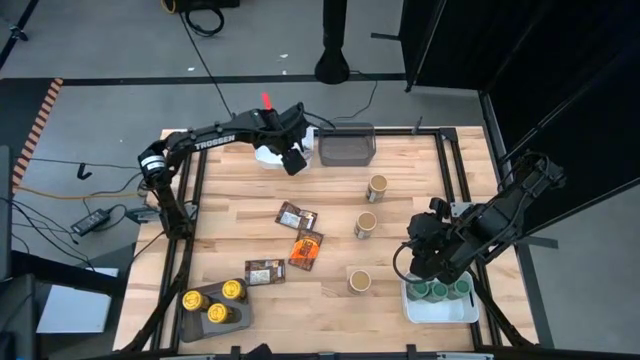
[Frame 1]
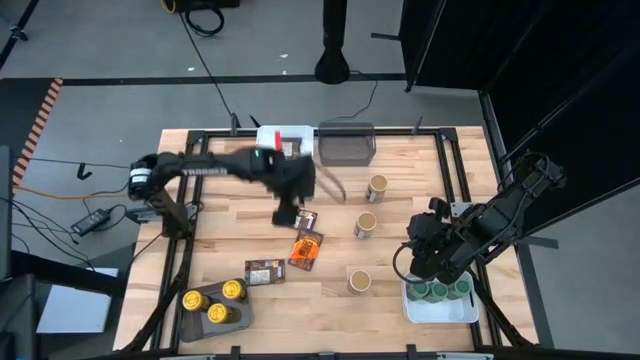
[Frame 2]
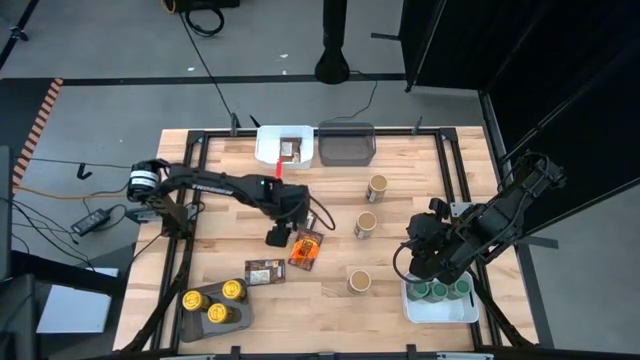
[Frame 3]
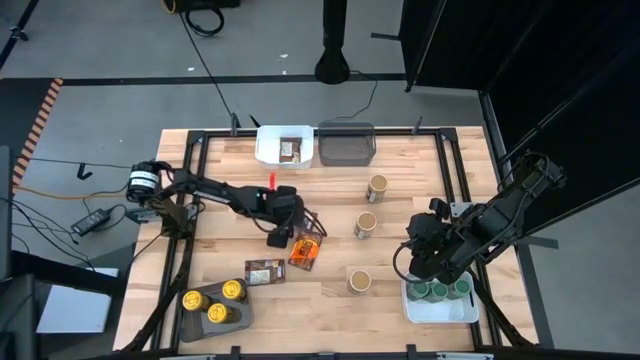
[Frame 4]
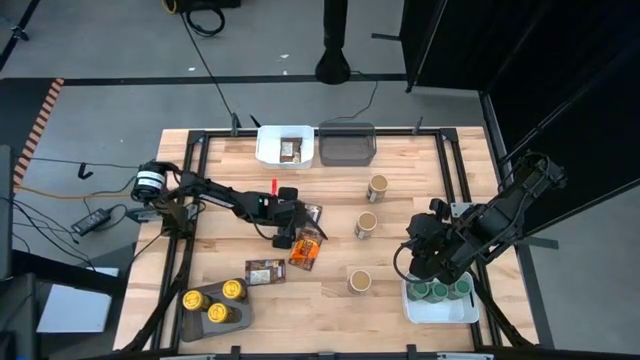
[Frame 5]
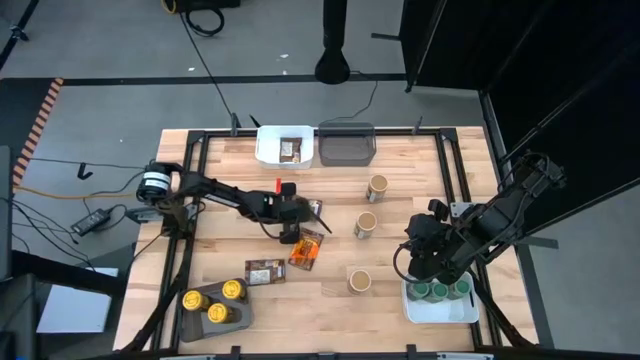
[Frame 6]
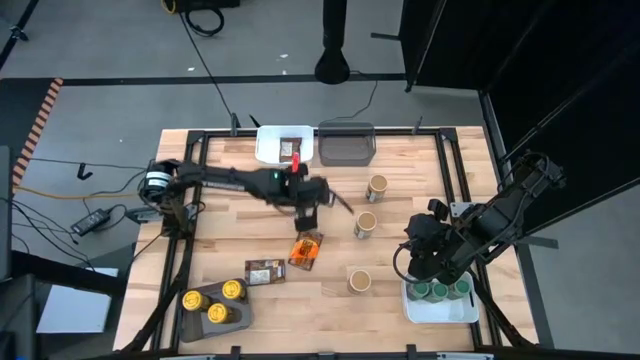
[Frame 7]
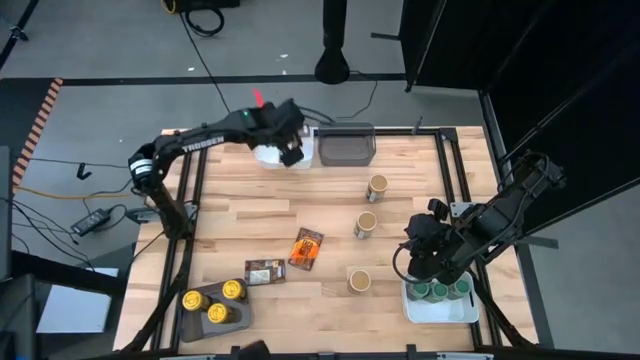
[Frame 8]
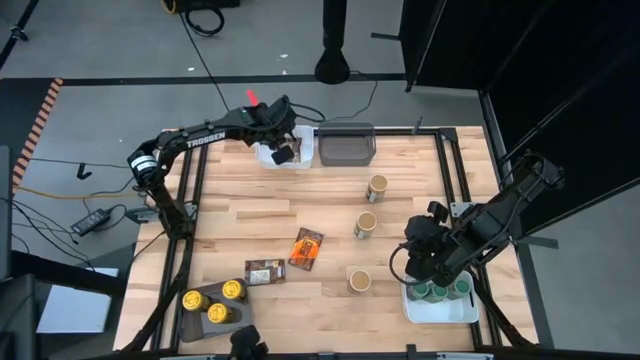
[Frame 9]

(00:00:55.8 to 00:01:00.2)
Task: Sort spices by type
Put the orange seasoning pack into the top white bin

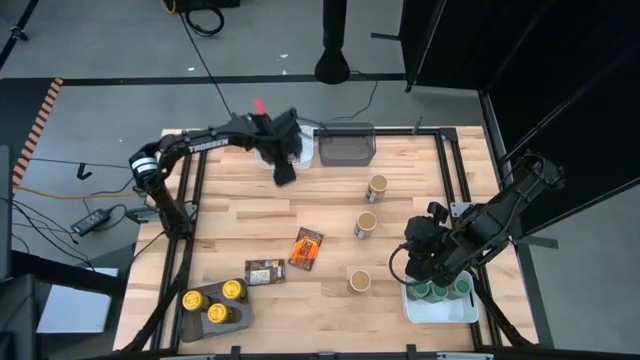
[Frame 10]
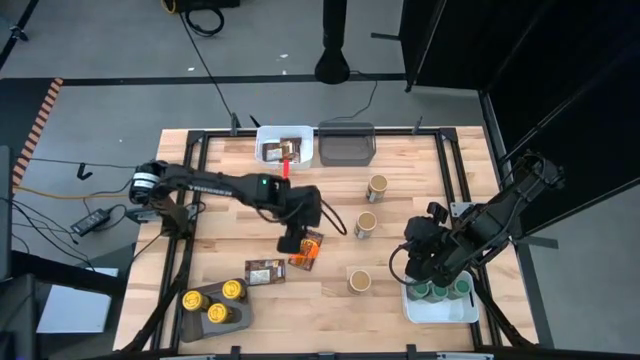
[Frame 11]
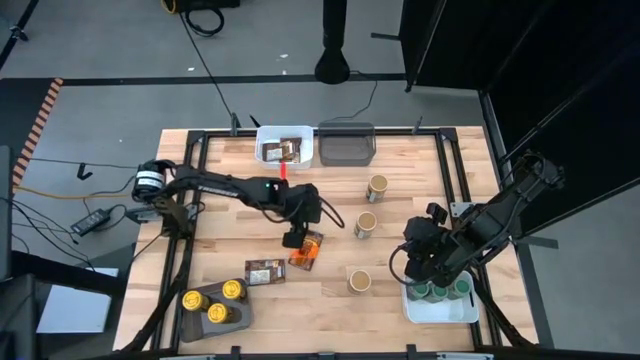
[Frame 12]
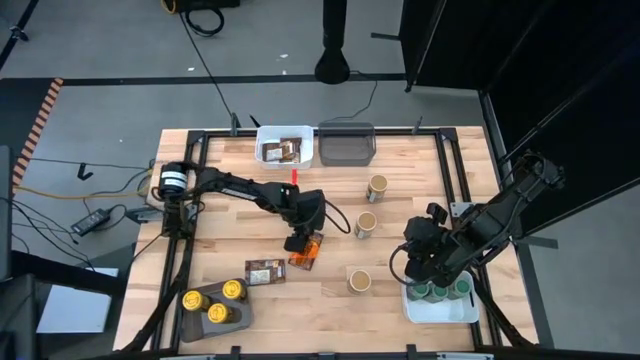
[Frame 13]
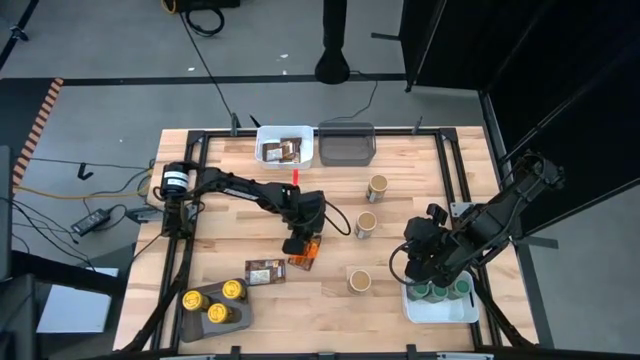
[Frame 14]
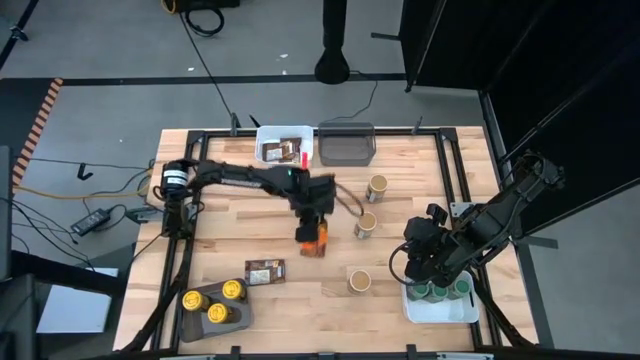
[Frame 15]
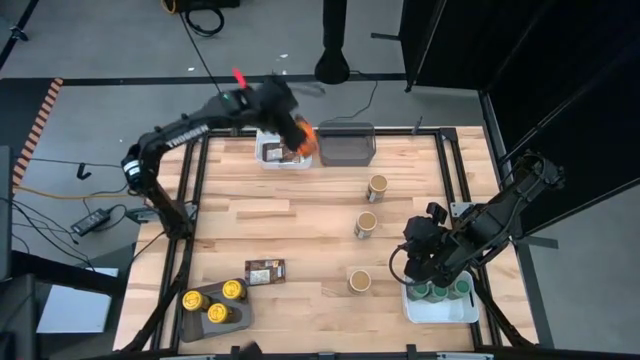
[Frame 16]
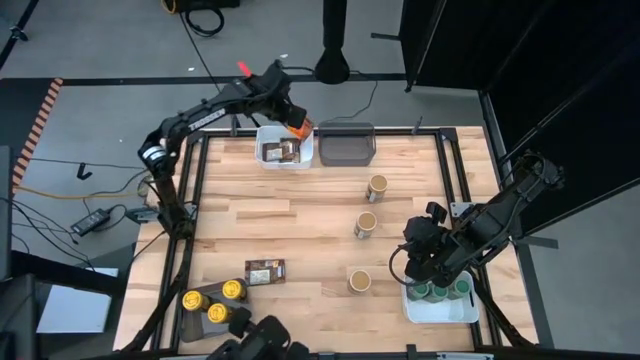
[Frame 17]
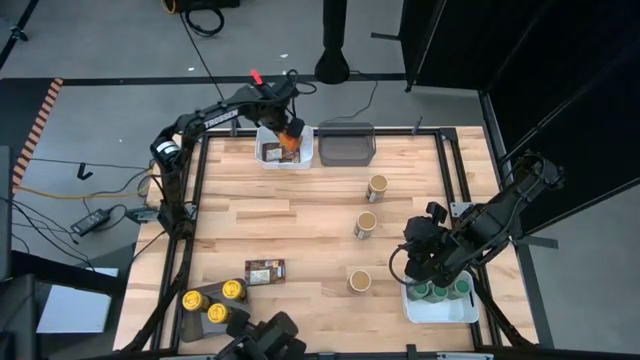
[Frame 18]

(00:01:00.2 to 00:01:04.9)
Put the orange seasoning pack into the top white bin

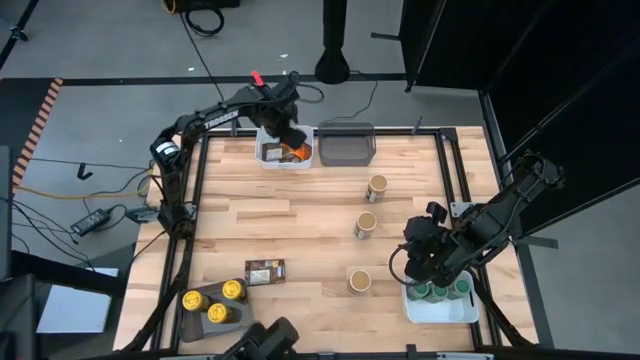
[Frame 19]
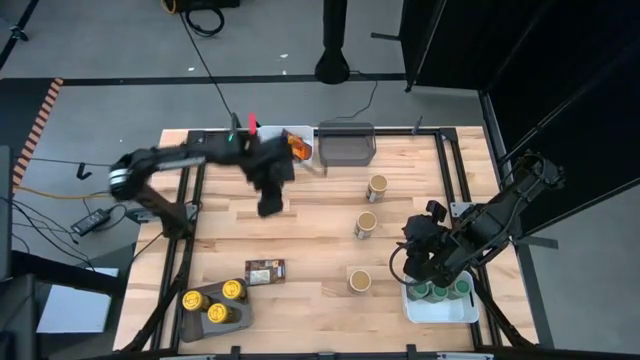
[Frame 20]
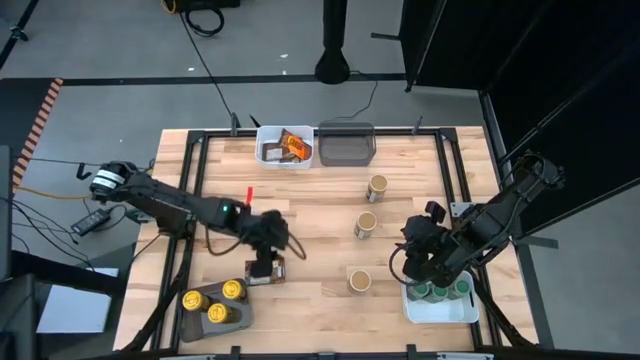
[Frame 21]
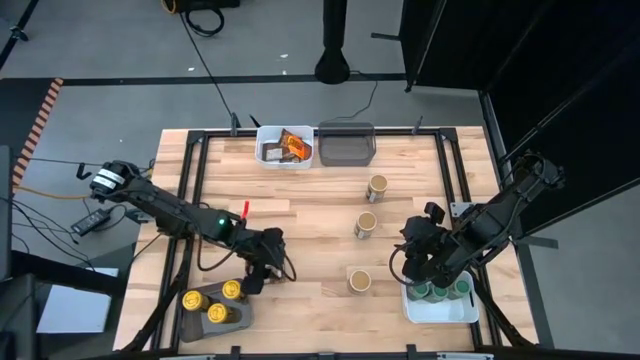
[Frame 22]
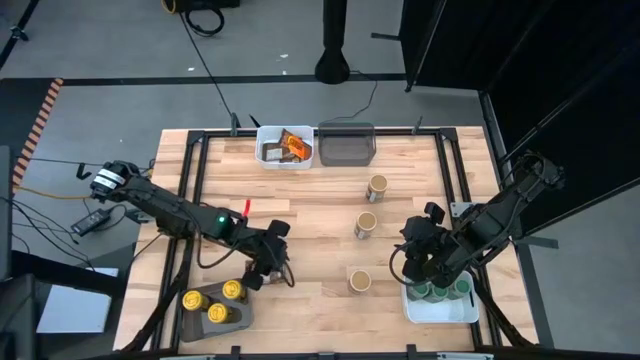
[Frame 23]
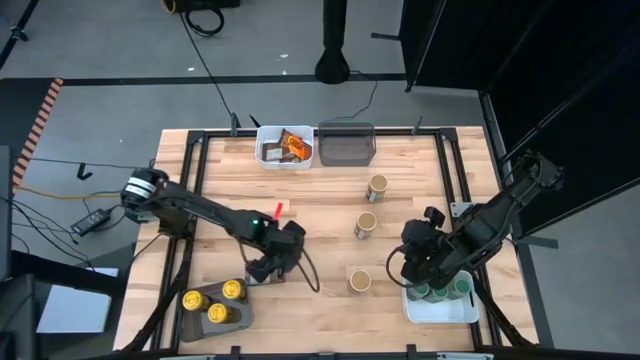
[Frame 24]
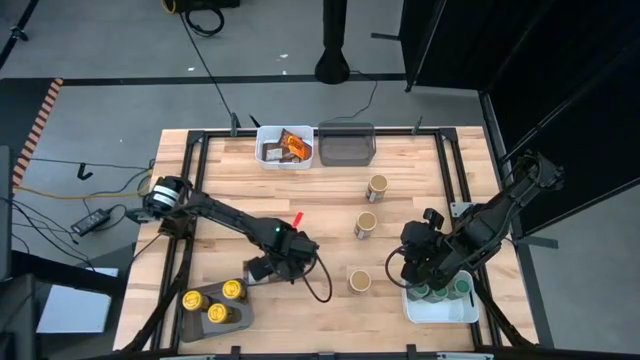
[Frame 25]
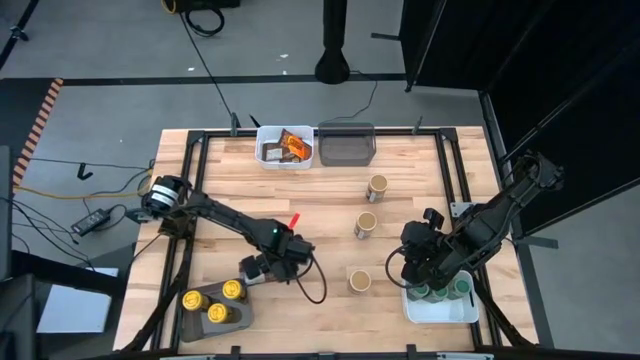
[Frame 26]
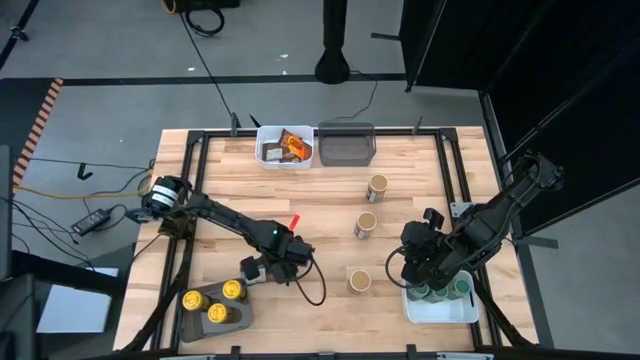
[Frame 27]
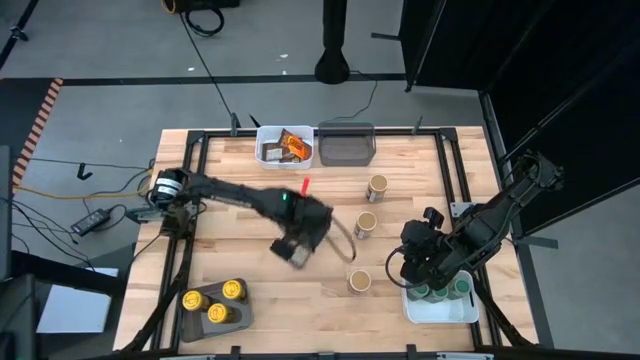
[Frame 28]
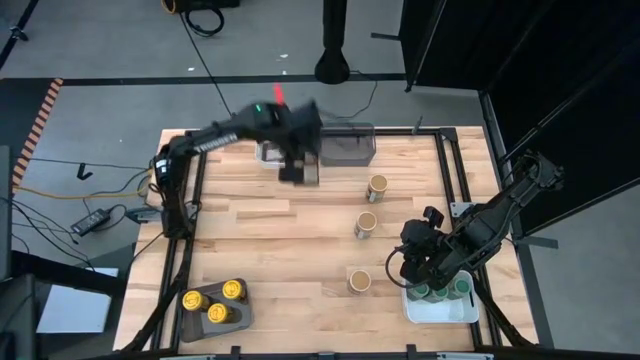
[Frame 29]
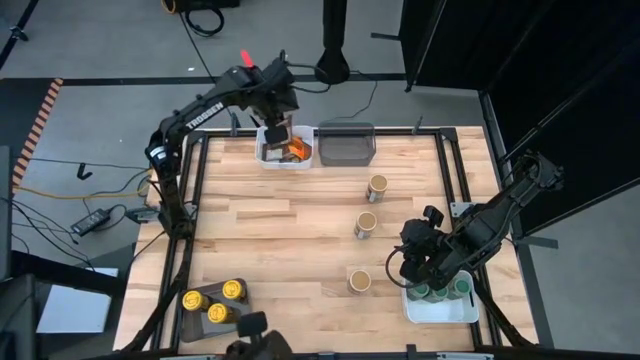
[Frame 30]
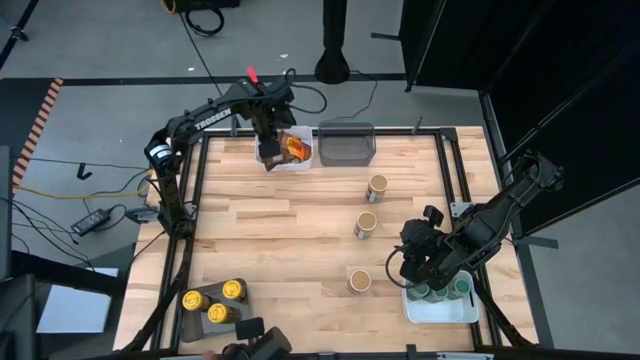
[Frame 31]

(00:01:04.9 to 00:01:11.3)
Put the orange seasoning pack into the top white bin

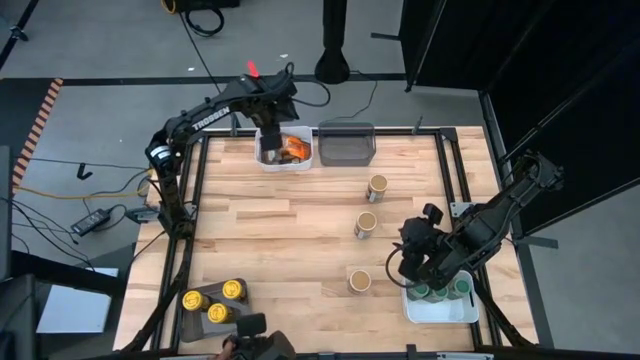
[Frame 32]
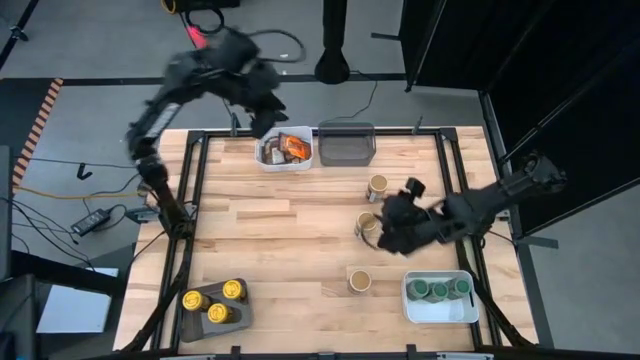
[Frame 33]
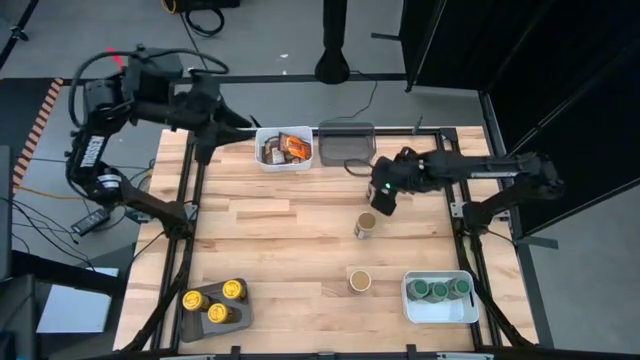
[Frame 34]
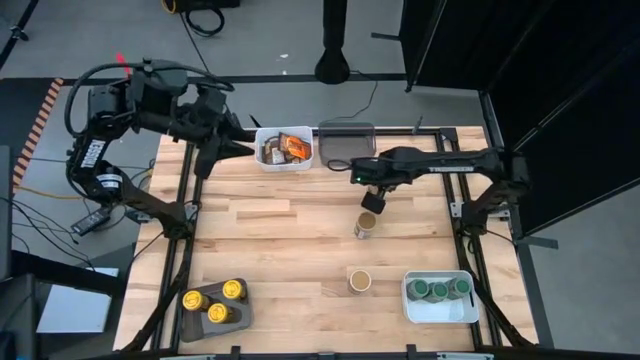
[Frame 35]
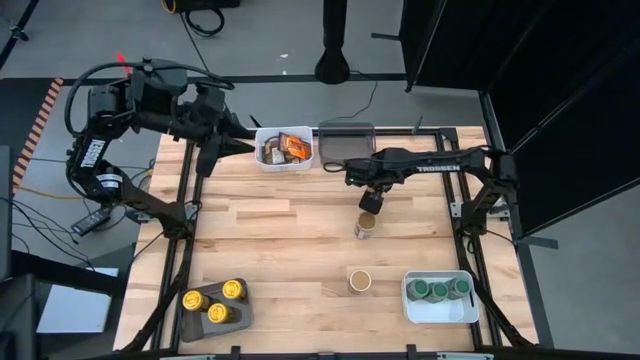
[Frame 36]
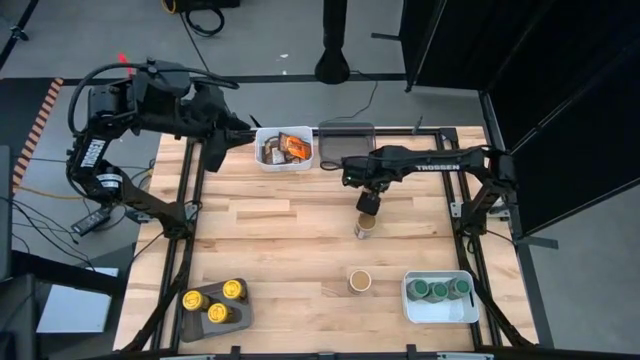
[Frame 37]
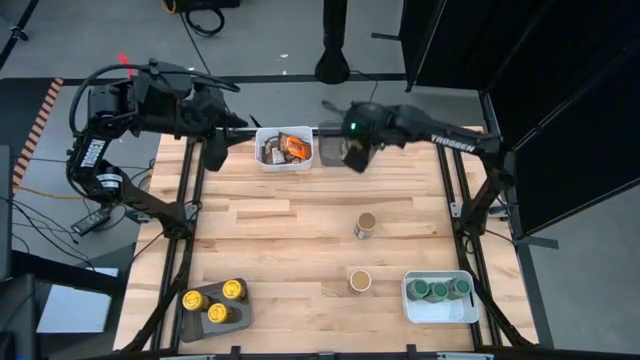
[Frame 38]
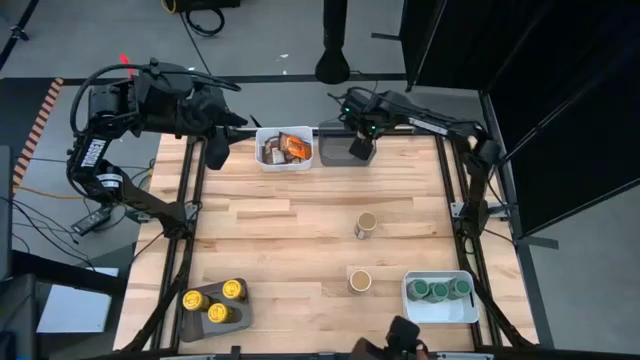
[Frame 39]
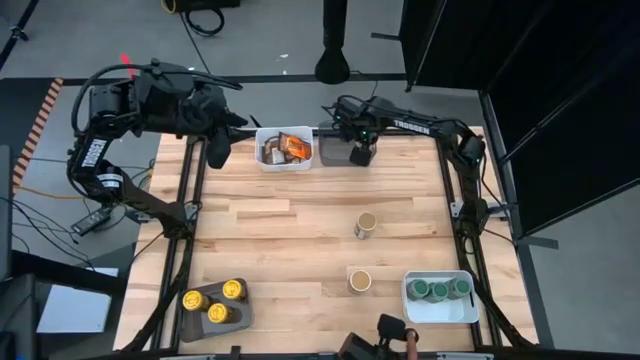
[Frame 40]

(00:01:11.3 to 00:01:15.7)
Put the brown seasoning bottle into the top black bin
